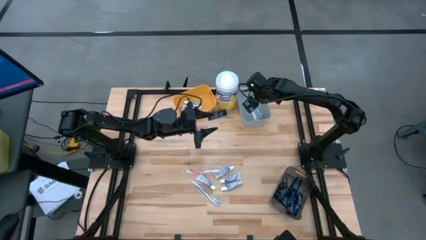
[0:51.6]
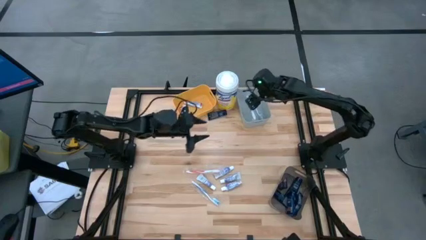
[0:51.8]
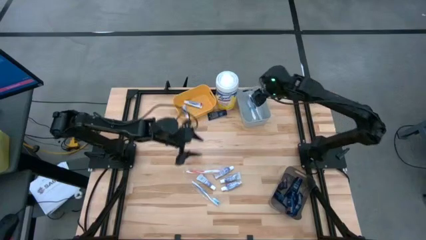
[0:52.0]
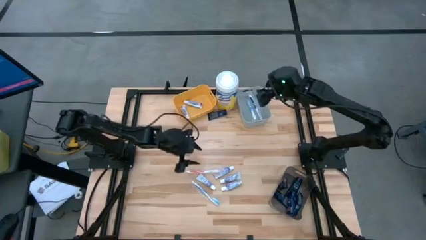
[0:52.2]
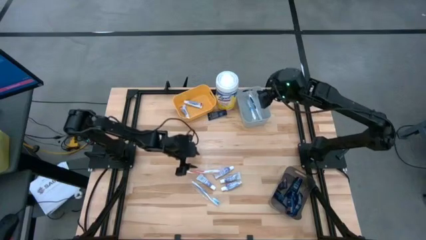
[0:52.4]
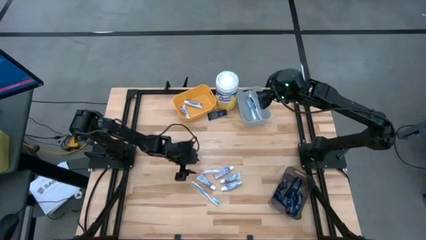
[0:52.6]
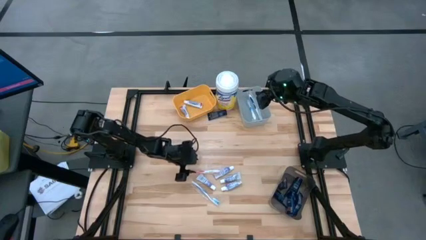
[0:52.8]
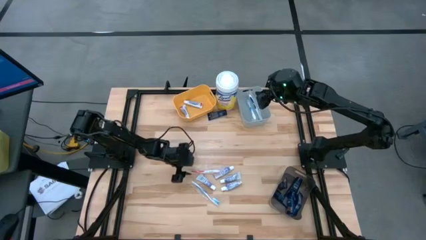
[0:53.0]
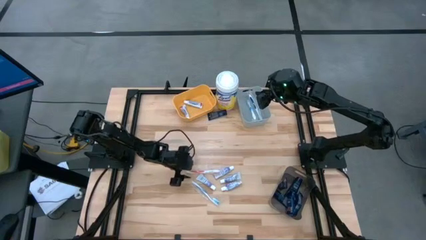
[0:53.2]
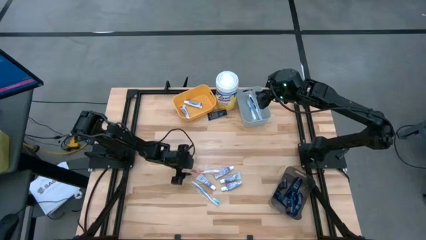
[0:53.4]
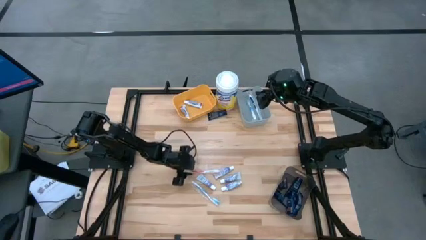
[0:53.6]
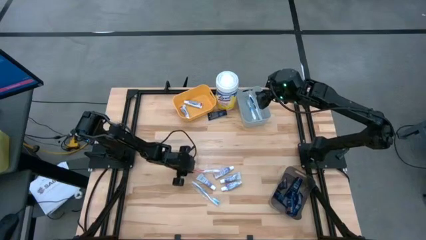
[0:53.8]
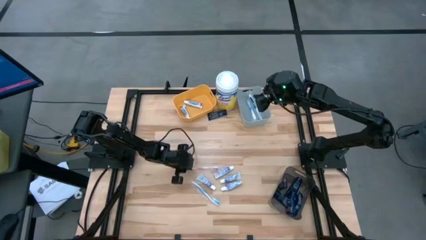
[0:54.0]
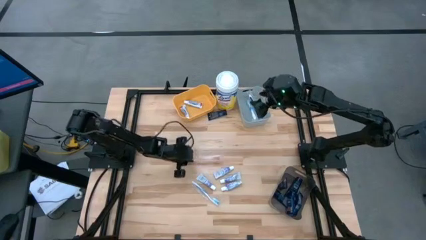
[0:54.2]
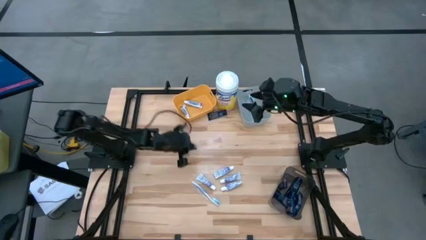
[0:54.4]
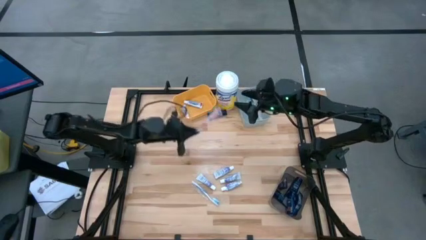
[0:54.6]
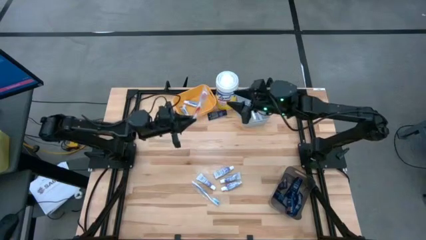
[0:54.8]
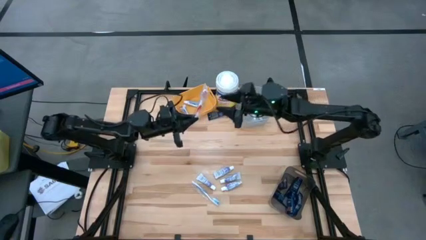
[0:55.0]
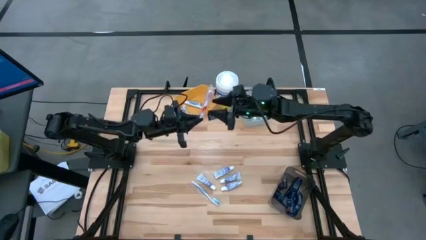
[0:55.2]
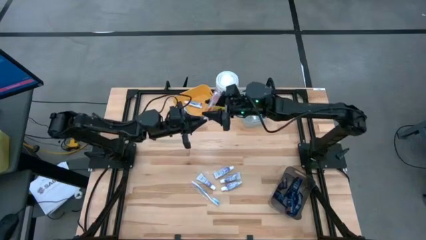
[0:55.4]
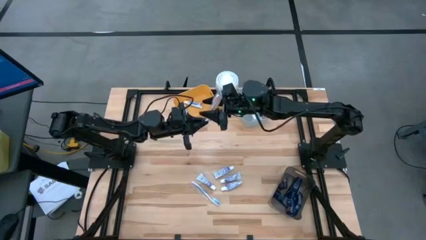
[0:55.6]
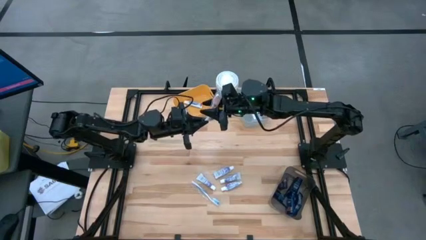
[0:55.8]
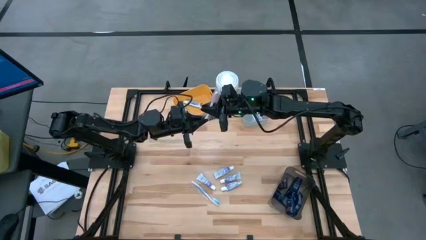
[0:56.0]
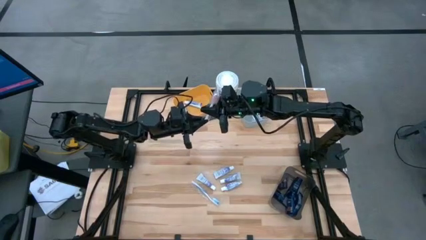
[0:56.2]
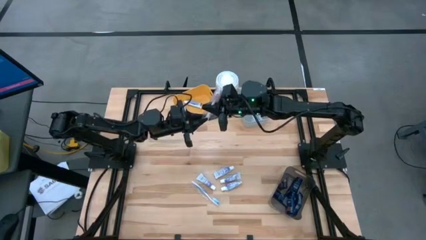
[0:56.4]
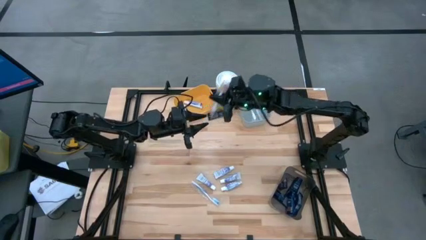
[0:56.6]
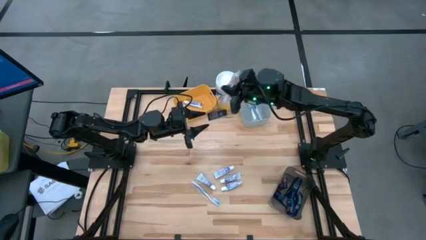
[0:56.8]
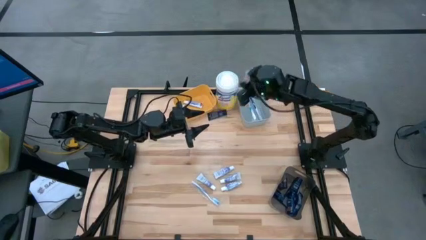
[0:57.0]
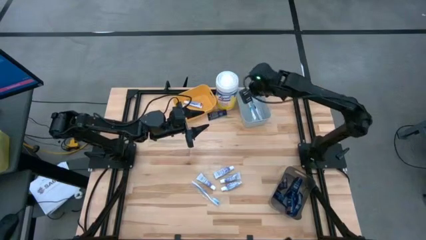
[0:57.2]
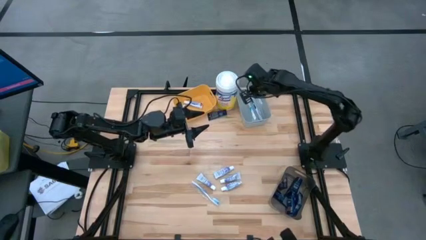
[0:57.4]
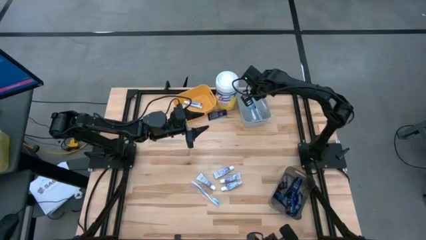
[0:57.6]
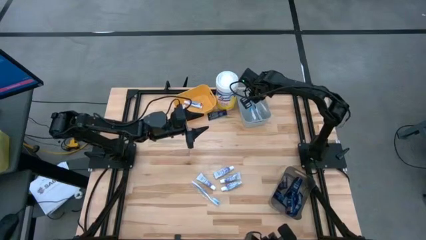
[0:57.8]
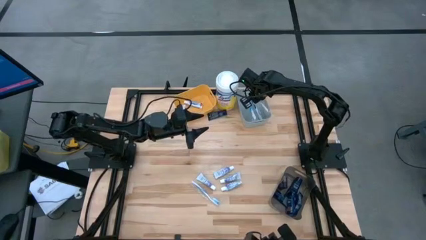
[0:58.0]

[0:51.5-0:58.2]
Task: Pick & Place Travel size toiletries
Put the red toothbrush into the gray bin

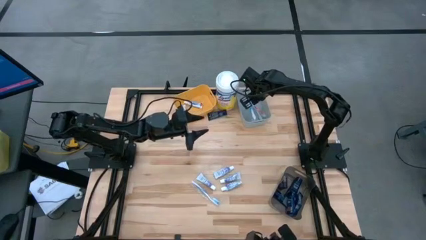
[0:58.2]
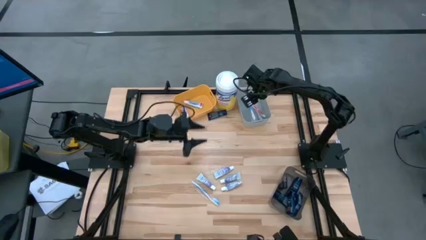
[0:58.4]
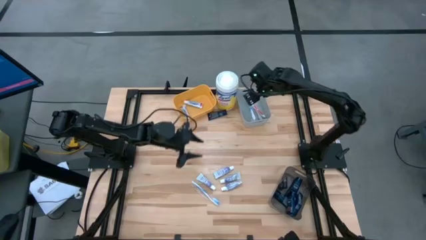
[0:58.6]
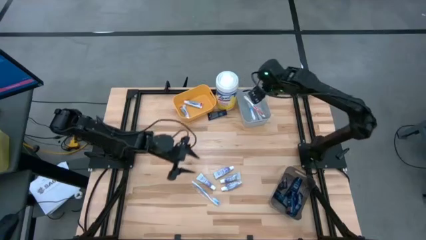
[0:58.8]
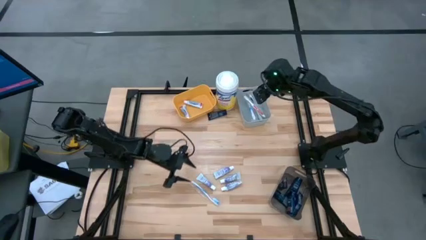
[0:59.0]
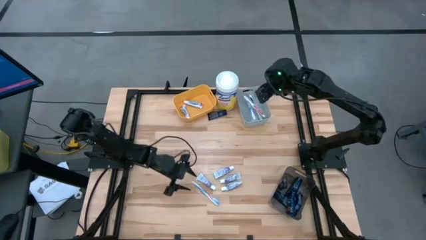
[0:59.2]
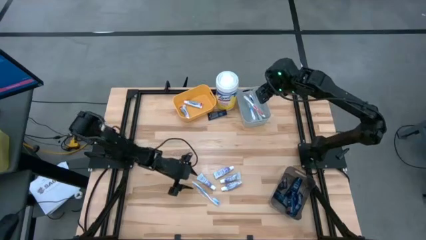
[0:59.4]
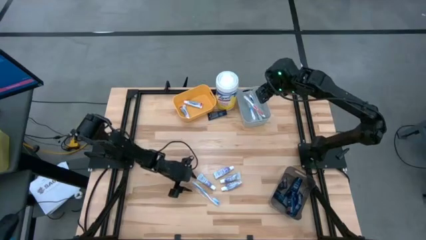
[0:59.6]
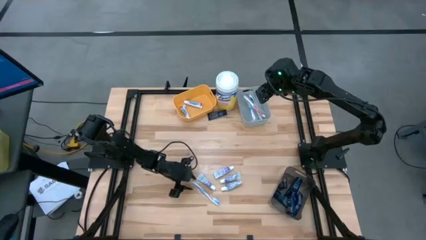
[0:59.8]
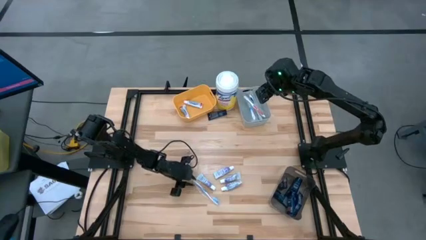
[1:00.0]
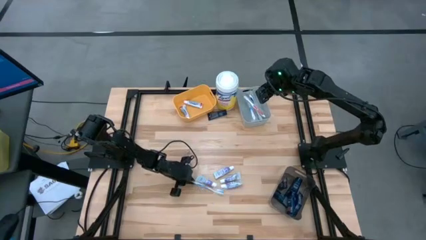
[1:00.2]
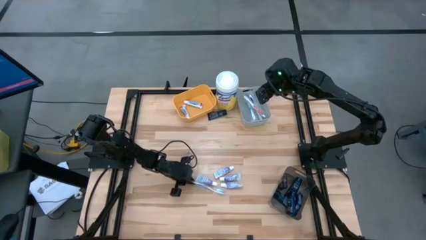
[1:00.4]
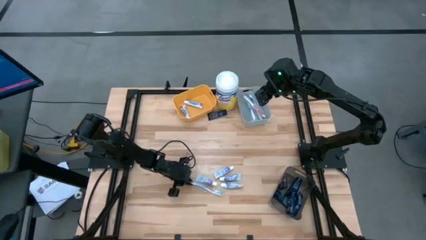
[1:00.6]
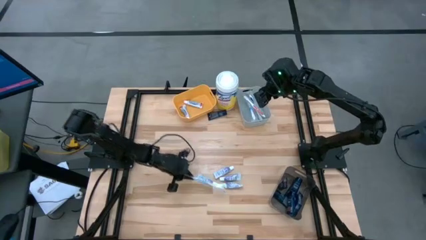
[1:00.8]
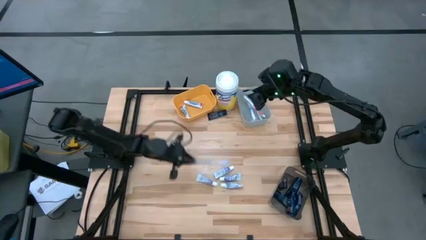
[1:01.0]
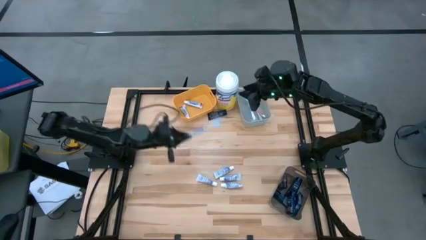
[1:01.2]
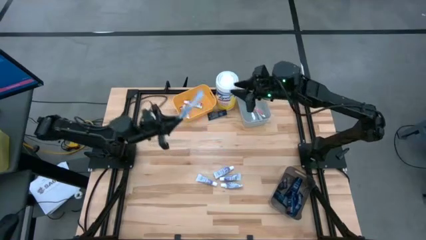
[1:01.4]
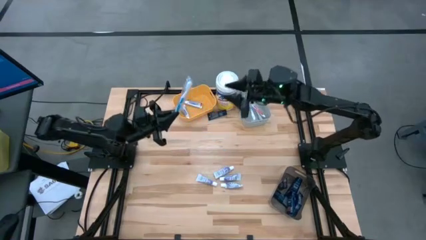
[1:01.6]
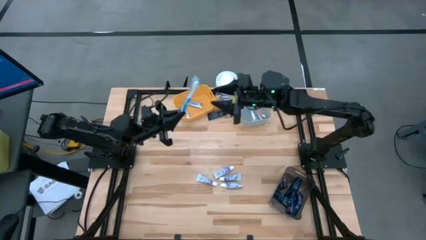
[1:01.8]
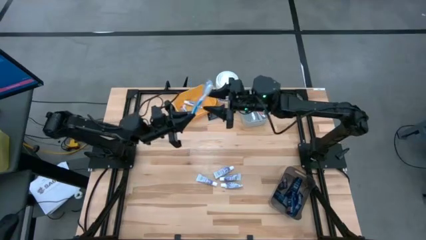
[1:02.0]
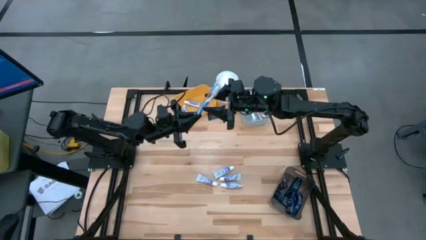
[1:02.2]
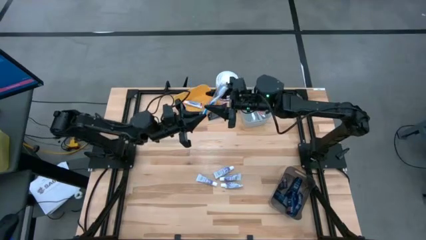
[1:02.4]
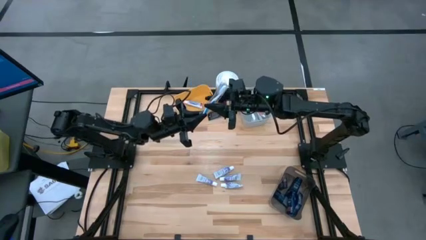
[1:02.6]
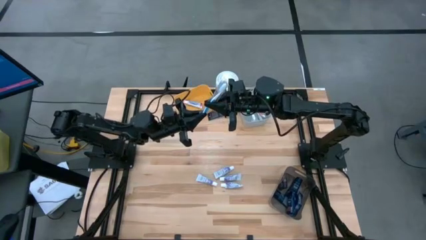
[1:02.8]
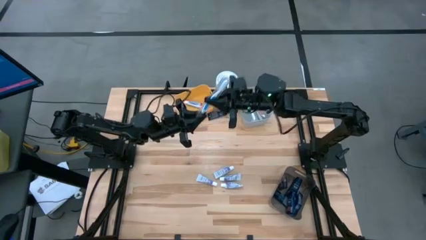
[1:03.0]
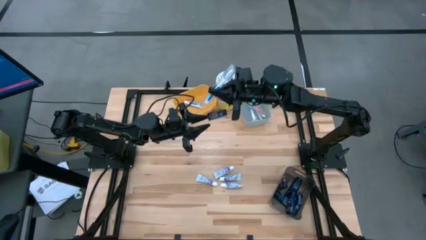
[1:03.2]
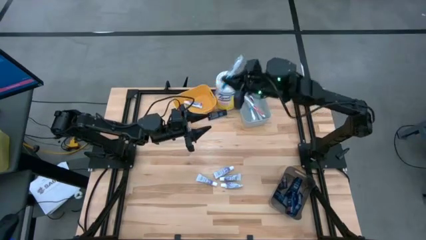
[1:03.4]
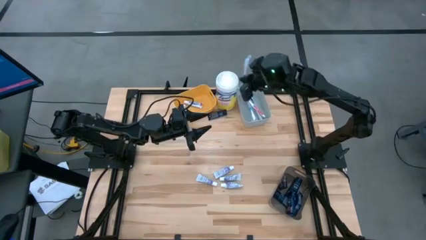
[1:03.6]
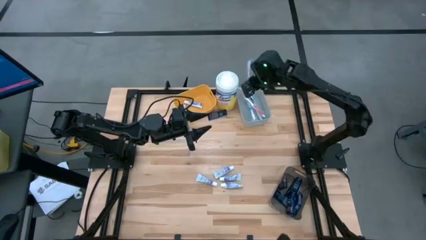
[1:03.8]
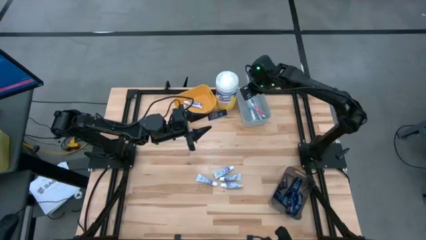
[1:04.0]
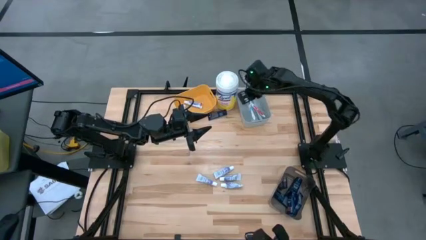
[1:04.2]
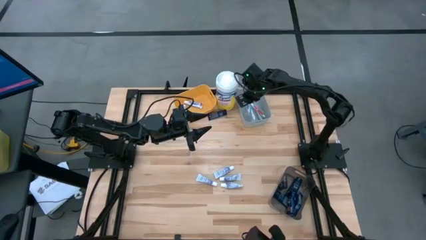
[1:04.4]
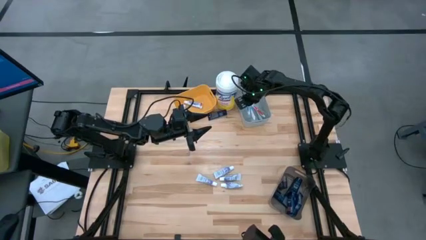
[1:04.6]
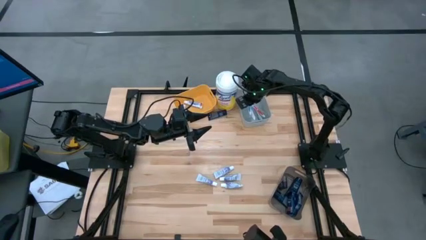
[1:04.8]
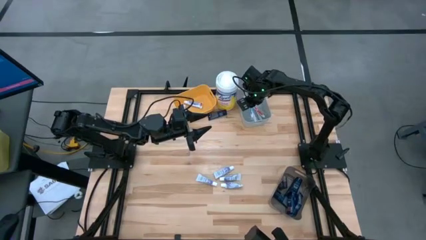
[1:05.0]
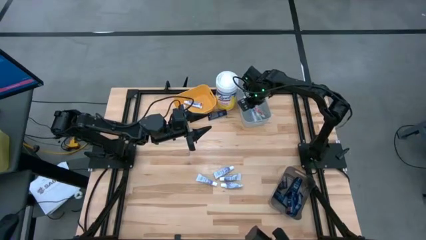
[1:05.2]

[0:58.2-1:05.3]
Put the blue toothbrush into the gray bin

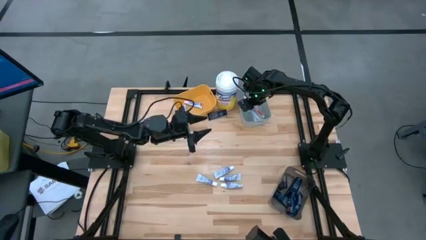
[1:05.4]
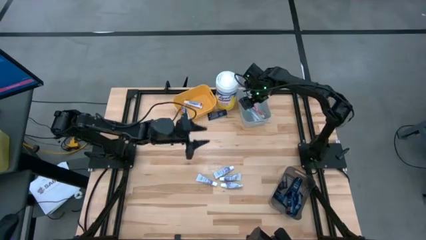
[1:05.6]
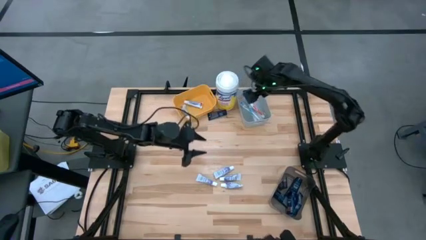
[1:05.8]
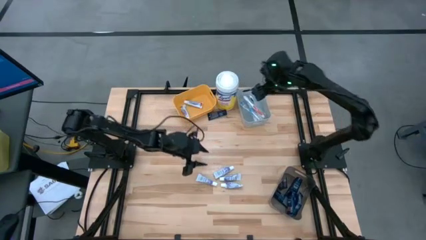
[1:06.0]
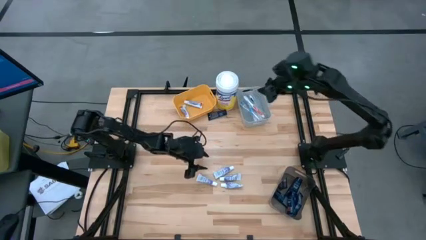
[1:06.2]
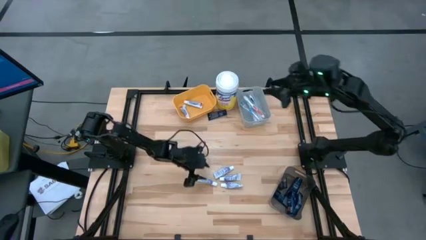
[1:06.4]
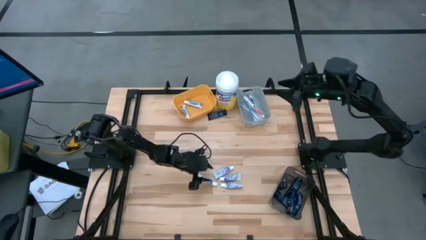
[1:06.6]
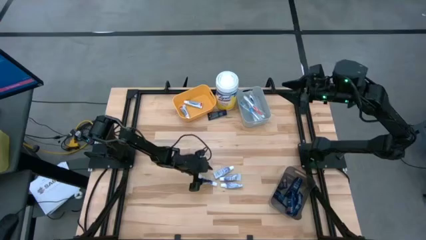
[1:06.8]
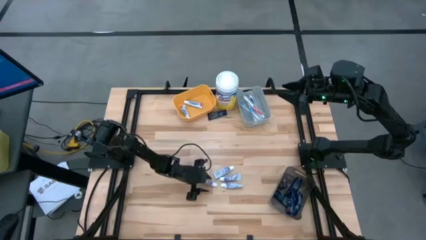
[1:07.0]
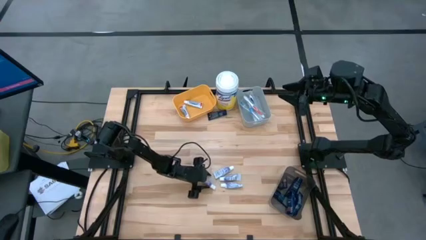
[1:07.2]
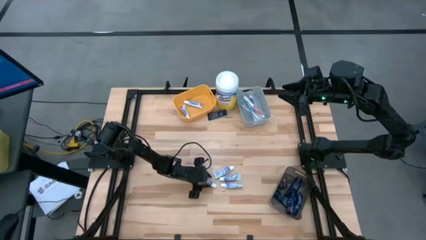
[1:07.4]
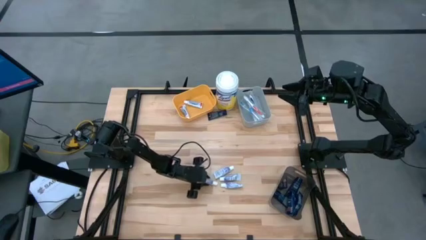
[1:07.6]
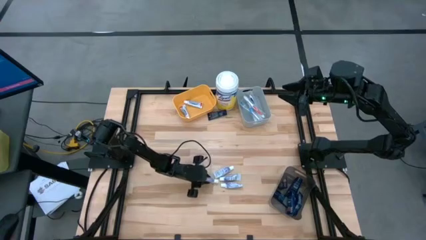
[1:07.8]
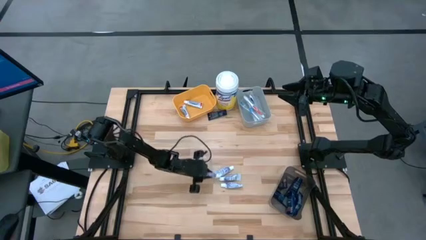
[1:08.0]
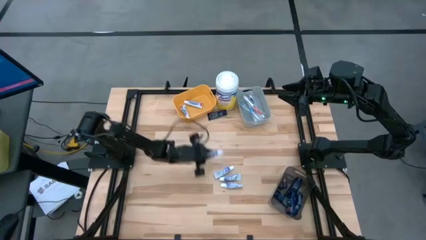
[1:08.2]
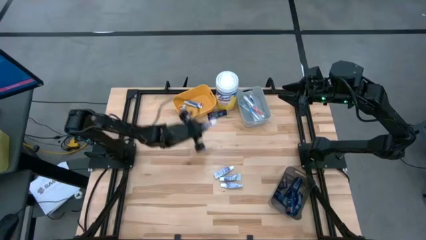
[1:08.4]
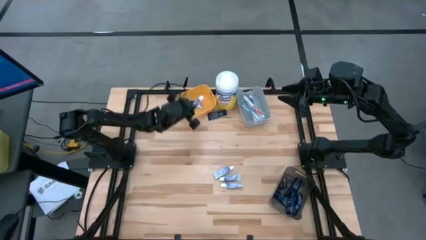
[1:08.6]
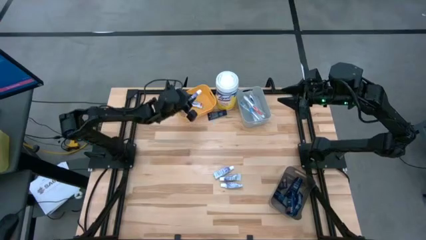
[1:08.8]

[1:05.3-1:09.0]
Put the violet toothpaste into the yellow bin
